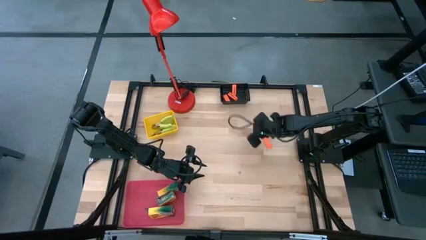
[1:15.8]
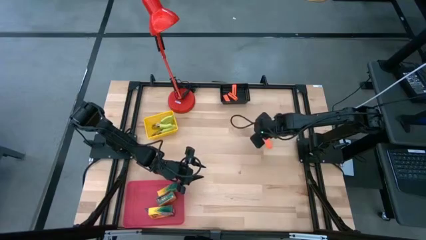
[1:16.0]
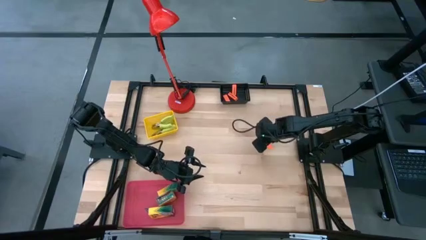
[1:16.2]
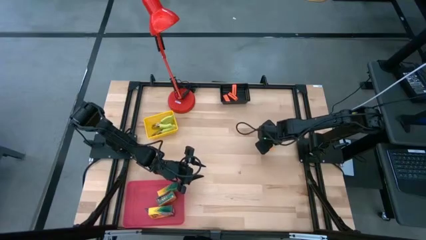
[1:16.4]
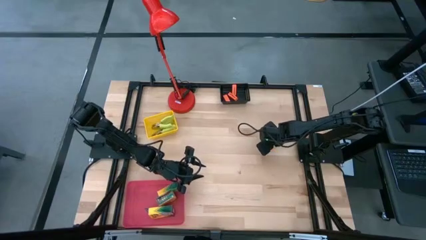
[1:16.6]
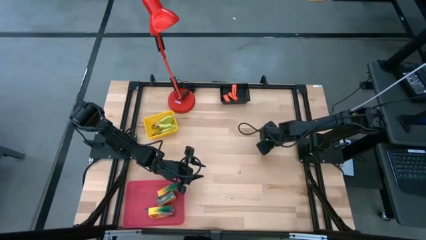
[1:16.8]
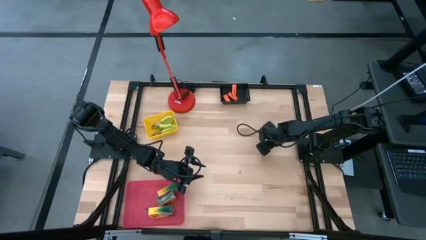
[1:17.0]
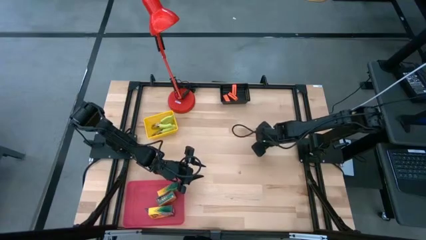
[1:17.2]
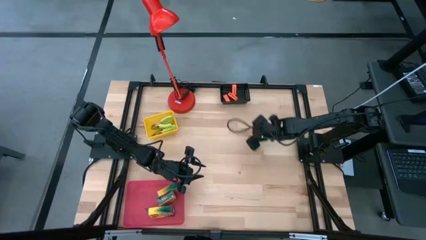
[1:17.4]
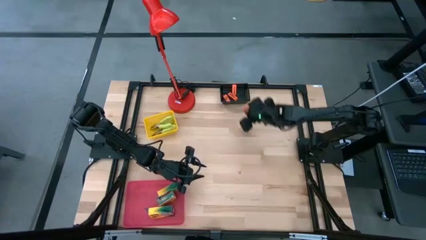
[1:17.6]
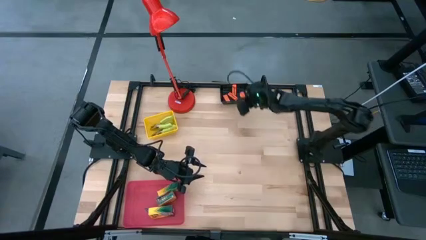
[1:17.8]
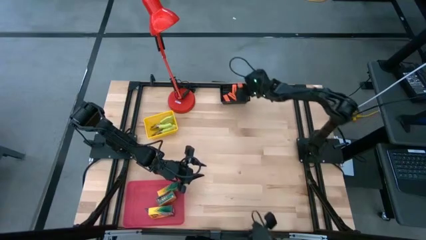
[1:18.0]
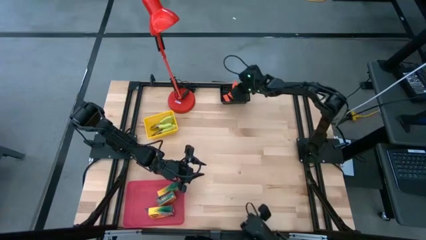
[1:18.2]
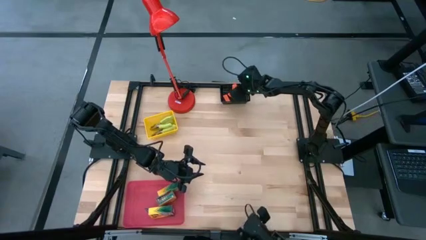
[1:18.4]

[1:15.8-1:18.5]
Task: Pick & Place School Supplies
Put the eraser into the black bin

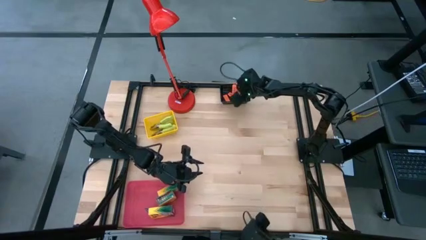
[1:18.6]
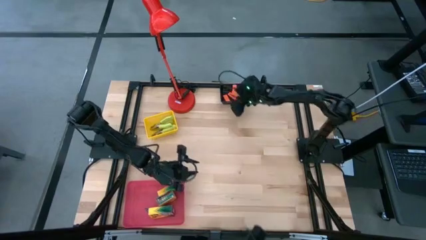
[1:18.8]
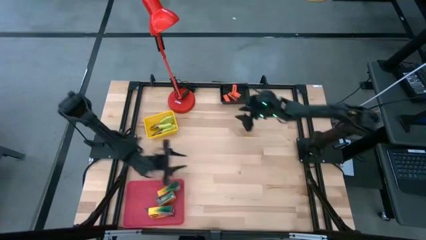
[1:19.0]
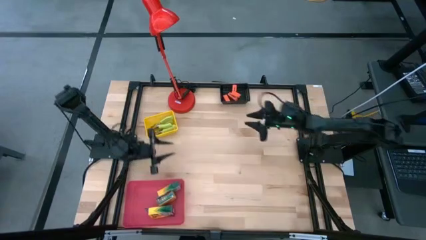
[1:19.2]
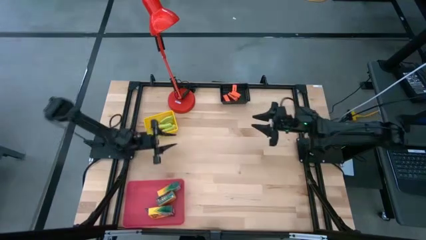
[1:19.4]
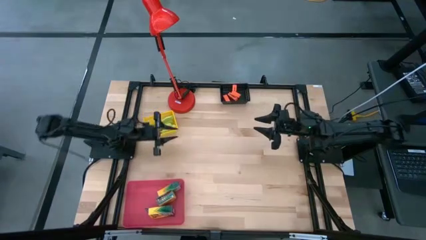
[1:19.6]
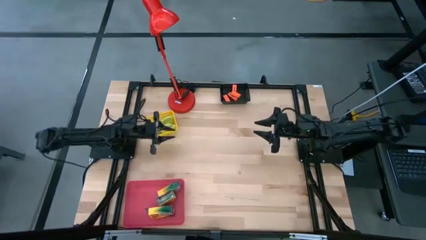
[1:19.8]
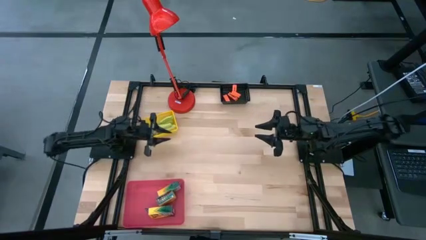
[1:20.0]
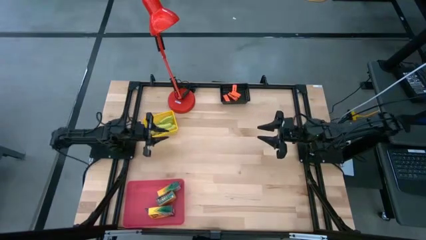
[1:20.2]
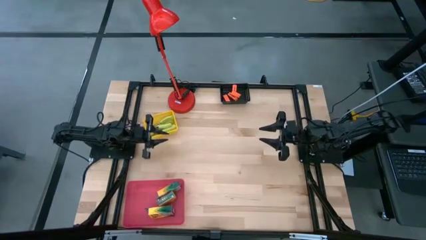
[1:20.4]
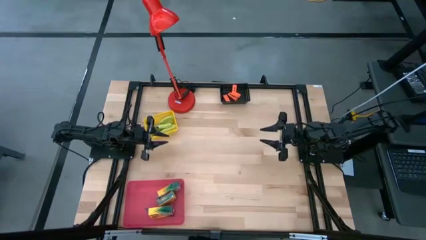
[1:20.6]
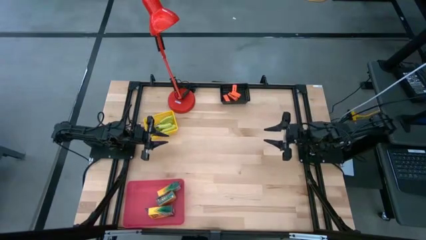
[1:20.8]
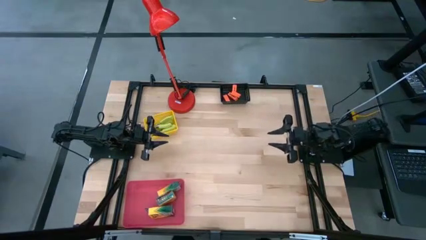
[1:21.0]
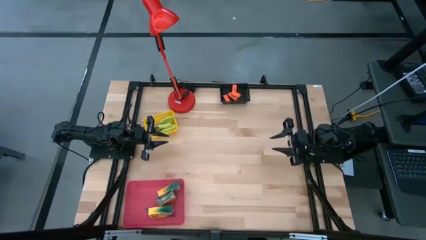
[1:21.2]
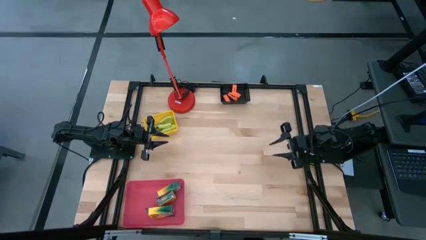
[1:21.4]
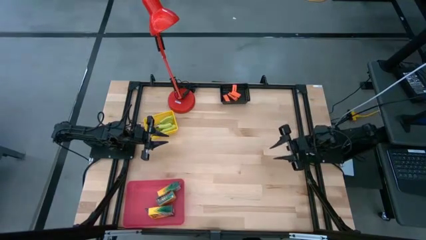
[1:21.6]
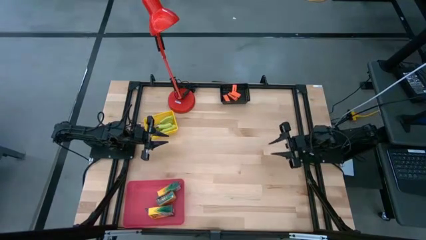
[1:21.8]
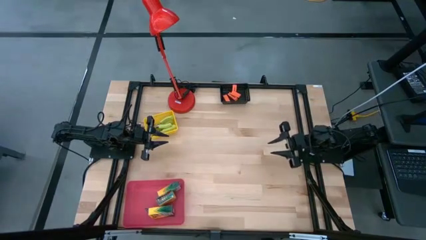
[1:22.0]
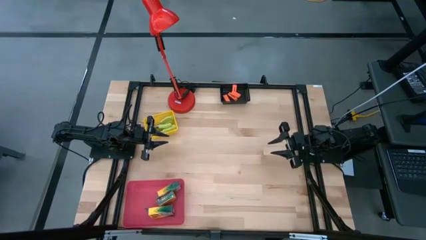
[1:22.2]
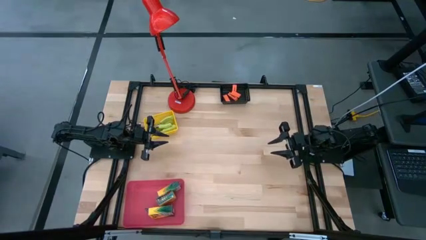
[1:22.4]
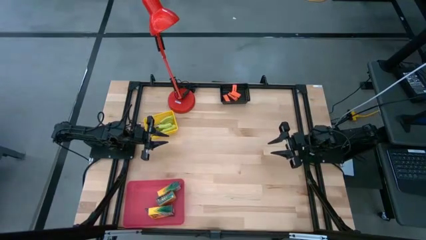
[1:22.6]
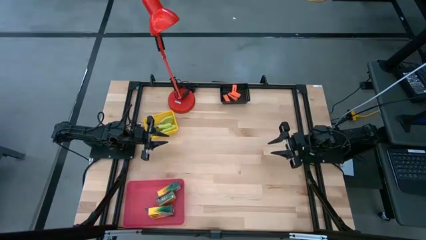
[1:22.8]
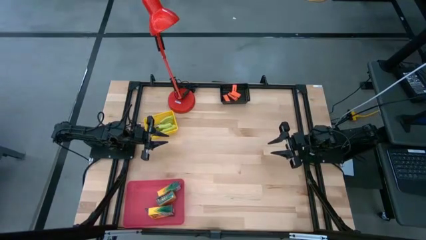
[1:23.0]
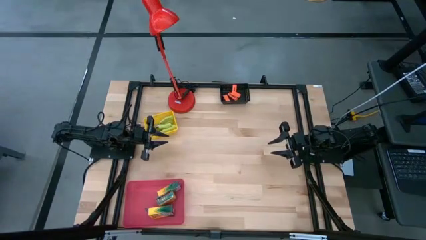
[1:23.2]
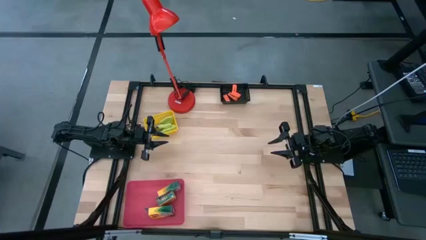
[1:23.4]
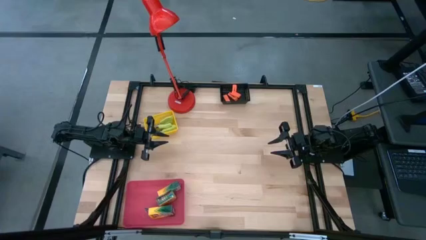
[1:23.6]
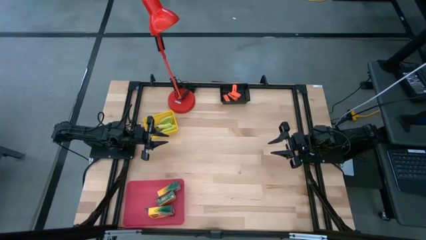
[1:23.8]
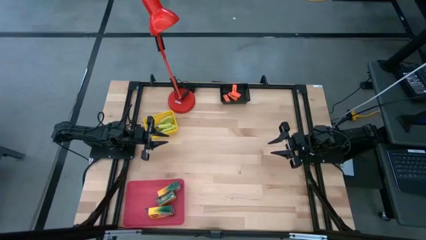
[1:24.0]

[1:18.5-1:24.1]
Return to Home Position

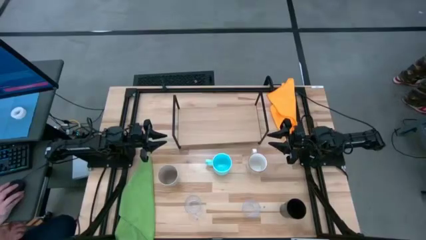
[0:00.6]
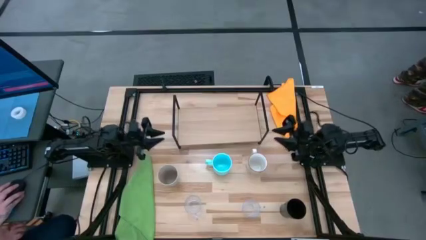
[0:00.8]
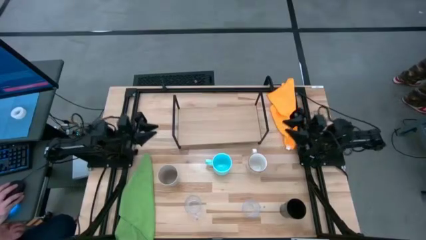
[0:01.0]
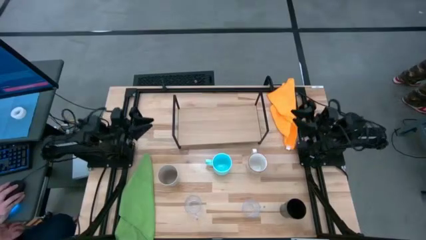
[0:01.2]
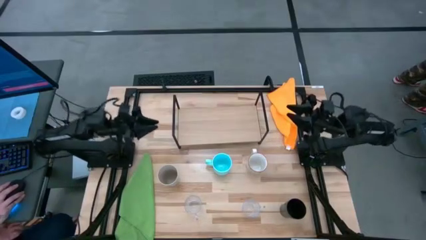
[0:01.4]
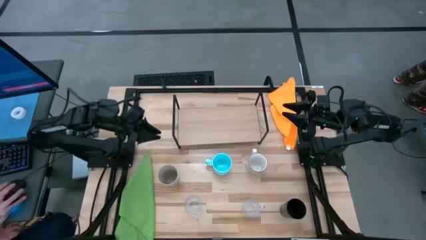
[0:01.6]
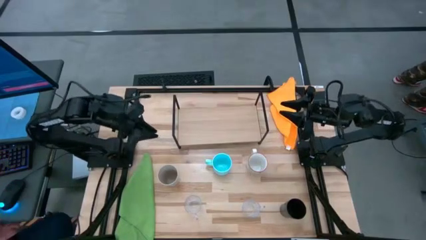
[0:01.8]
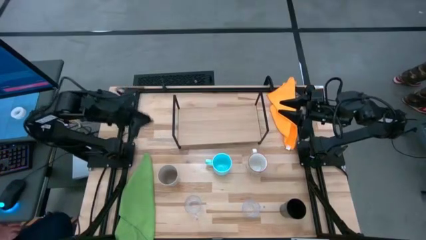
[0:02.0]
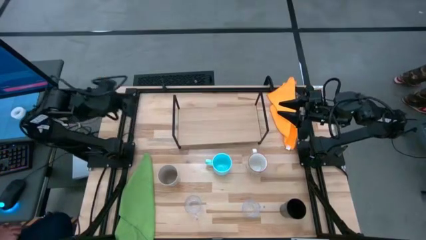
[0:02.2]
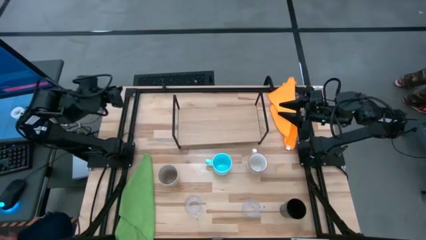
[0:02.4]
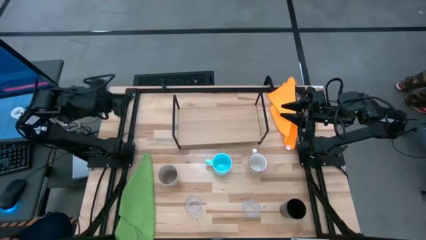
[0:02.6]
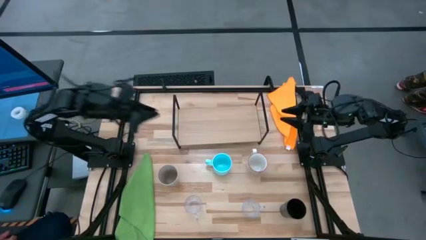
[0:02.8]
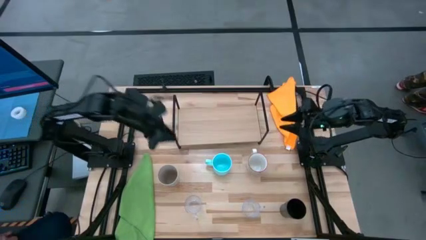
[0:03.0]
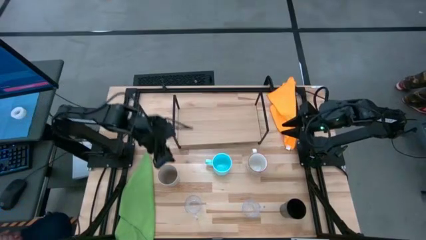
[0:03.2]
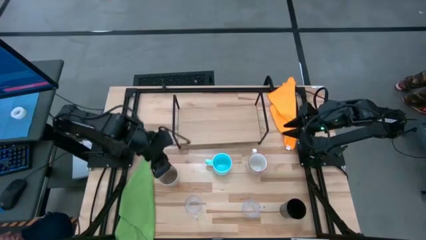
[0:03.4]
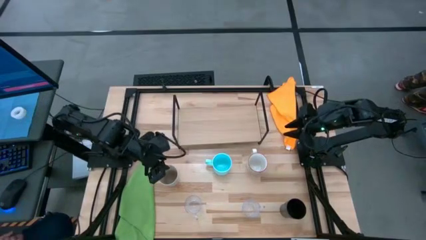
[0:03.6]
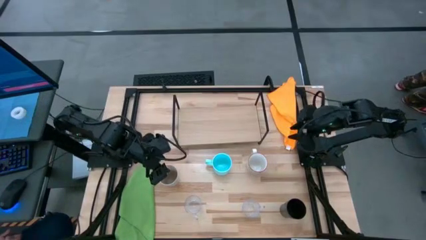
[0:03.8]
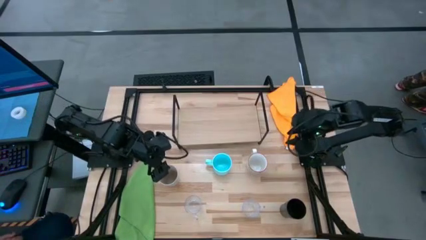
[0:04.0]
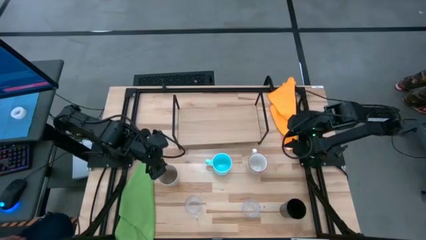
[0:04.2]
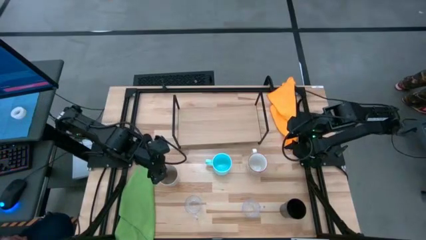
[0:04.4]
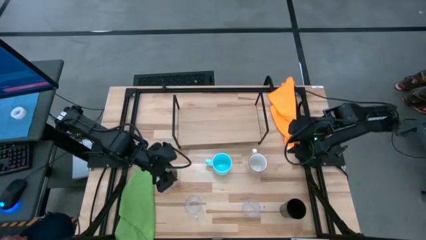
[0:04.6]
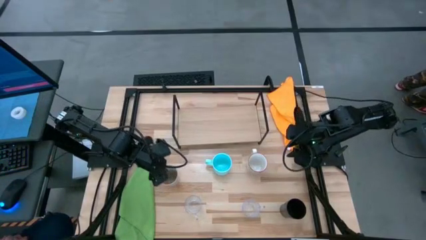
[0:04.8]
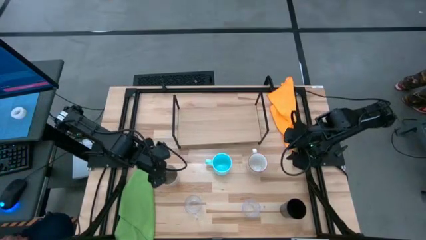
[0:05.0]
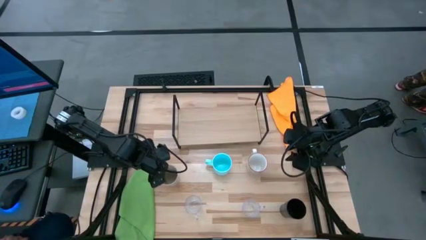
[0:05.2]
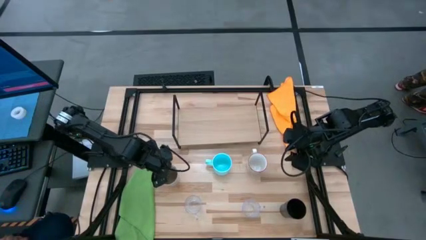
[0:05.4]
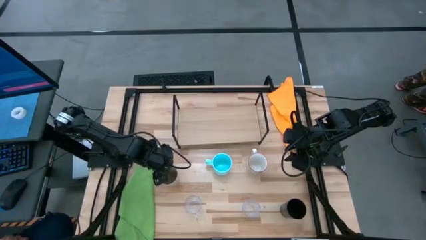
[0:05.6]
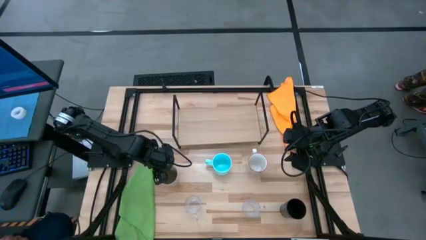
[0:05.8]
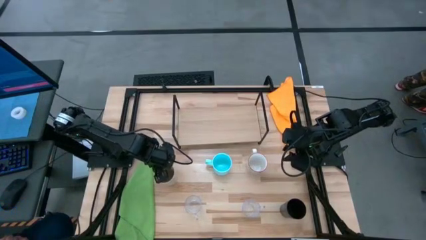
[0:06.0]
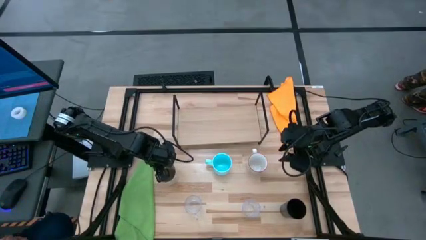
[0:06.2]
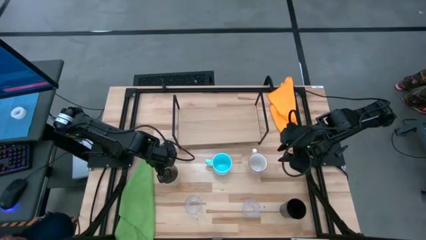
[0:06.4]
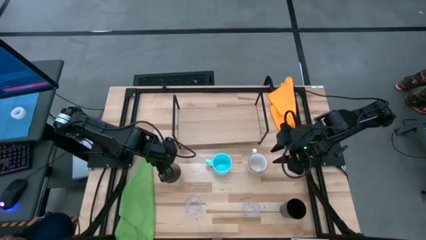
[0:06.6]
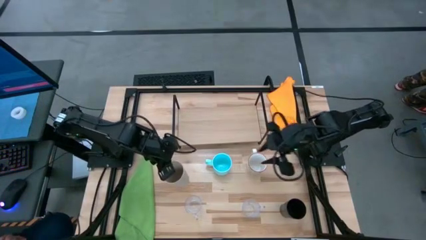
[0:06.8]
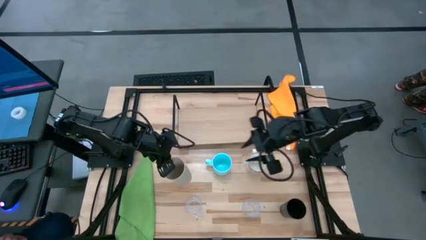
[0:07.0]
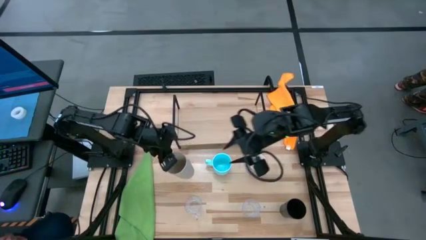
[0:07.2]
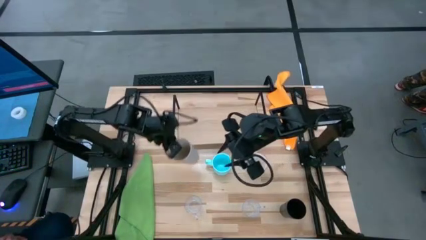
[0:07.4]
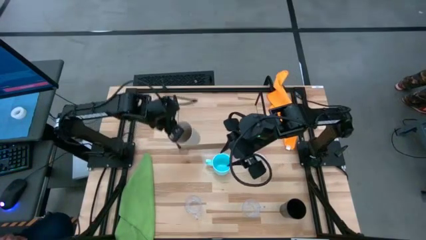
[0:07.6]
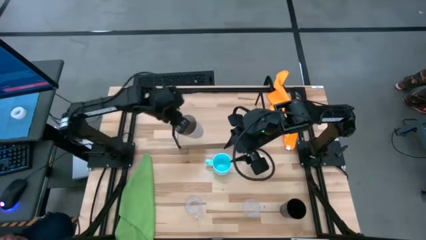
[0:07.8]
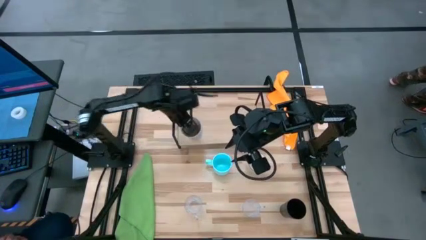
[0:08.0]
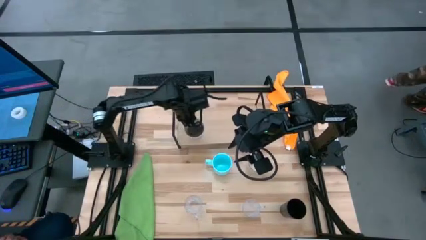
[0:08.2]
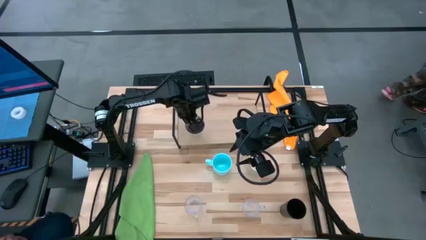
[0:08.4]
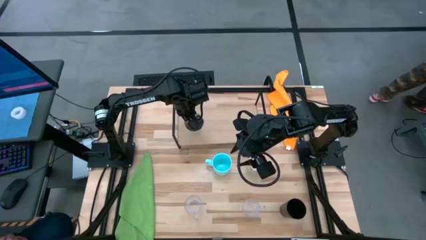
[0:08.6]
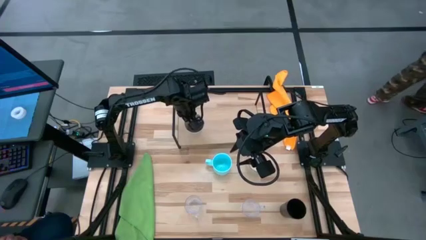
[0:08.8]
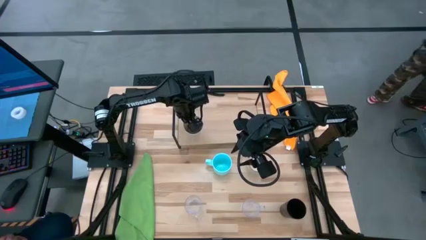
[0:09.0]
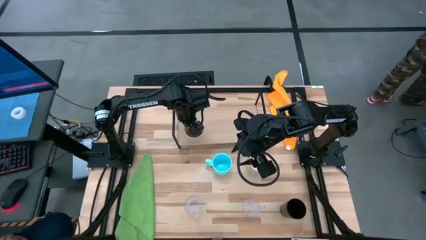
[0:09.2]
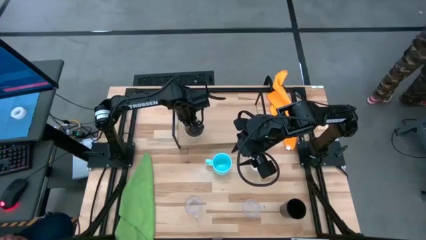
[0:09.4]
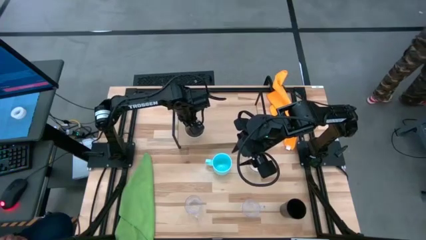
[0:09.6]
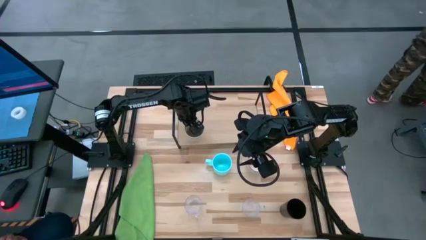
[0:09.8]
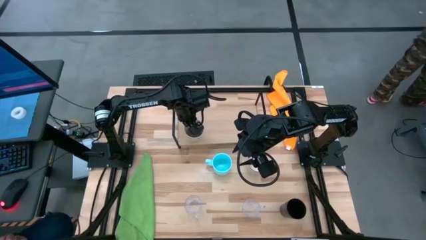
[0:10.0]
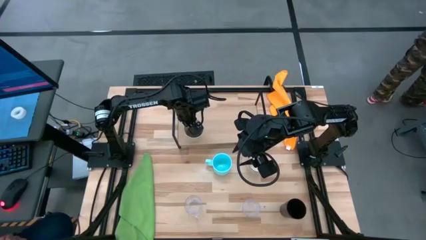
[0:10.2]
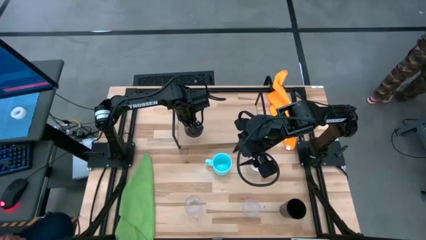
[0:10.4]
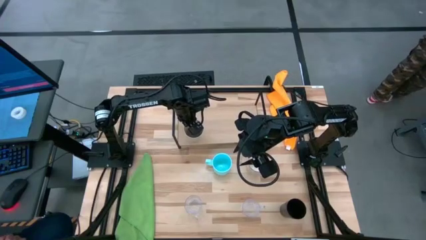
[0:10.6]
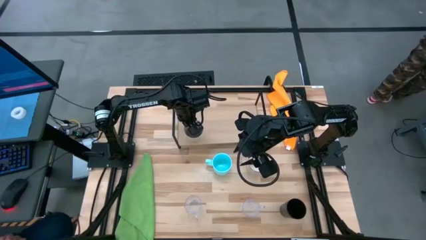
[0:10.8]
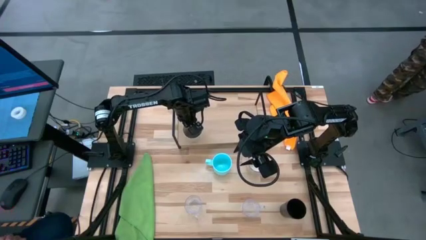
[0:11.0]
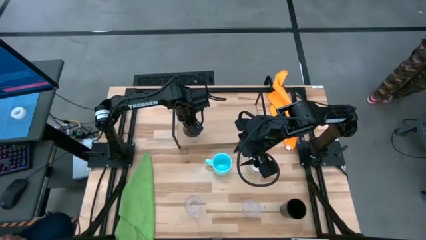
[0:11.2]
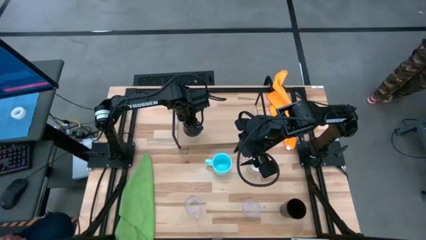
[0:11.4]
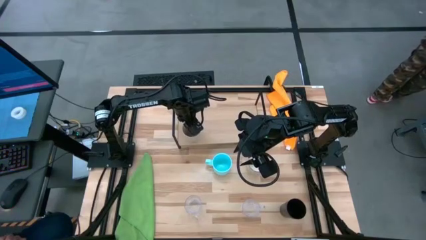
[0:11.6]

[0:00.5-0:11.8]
Task: Stack small to large cups/mugs on shelf
Put the gray cup on the shelf
